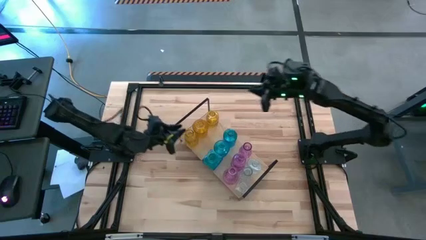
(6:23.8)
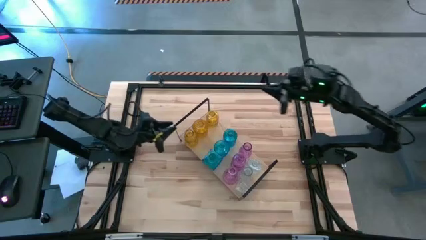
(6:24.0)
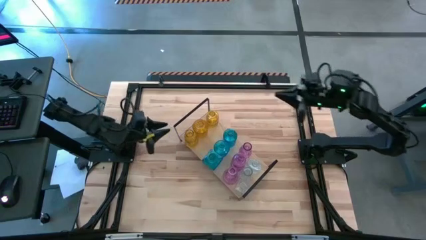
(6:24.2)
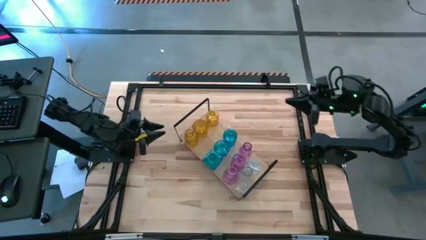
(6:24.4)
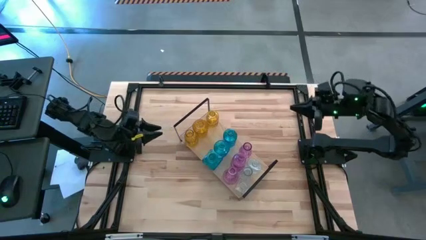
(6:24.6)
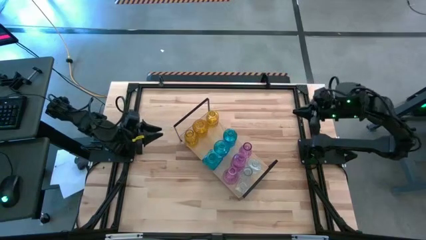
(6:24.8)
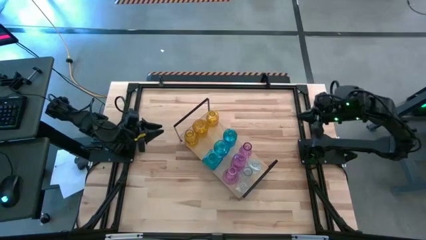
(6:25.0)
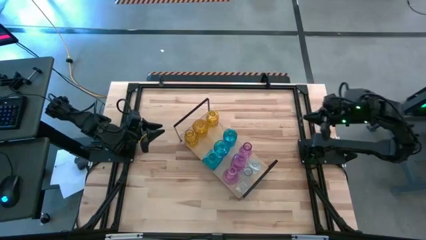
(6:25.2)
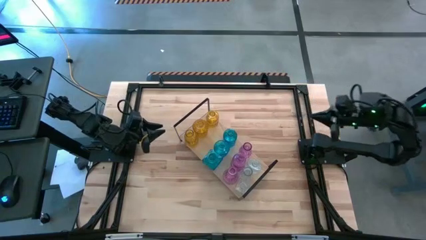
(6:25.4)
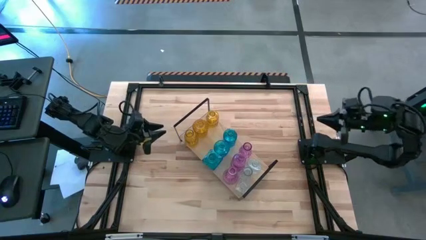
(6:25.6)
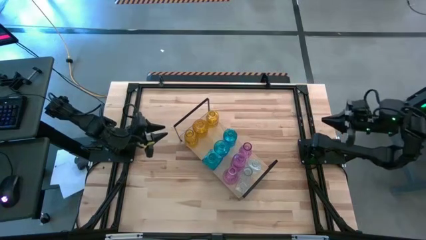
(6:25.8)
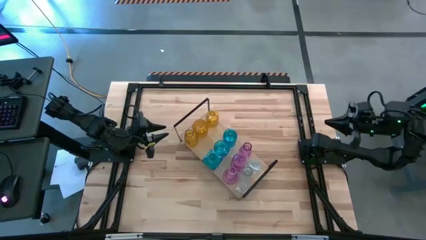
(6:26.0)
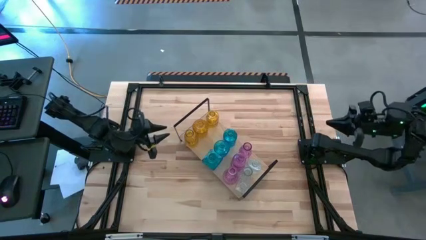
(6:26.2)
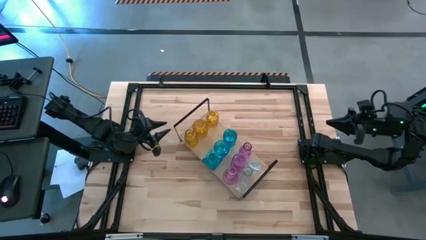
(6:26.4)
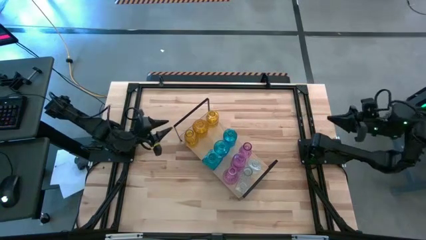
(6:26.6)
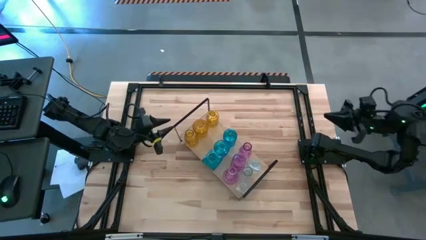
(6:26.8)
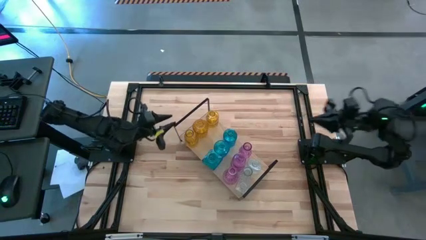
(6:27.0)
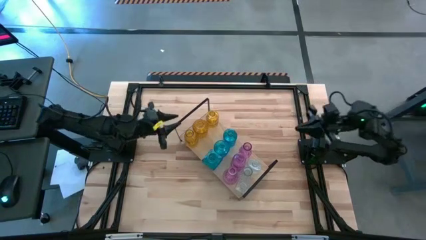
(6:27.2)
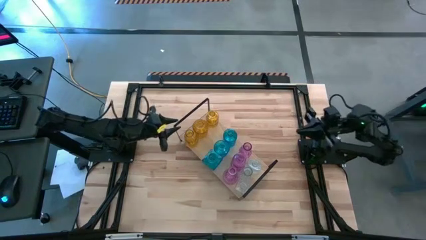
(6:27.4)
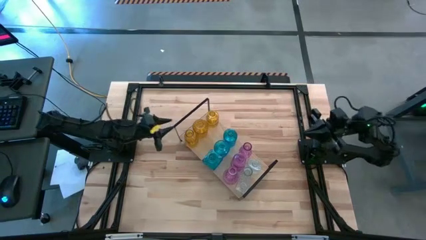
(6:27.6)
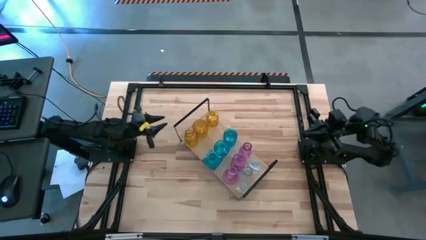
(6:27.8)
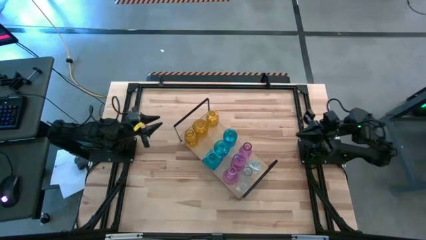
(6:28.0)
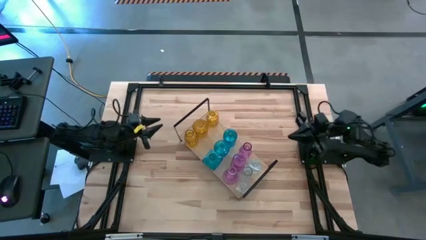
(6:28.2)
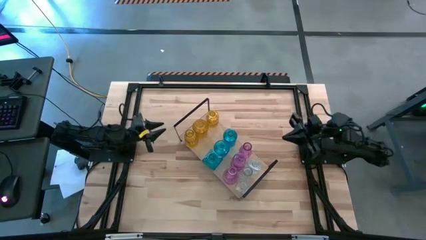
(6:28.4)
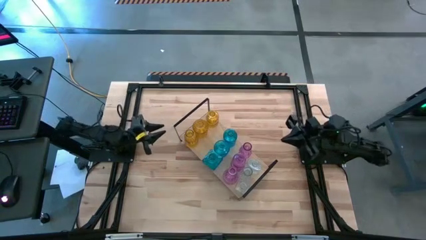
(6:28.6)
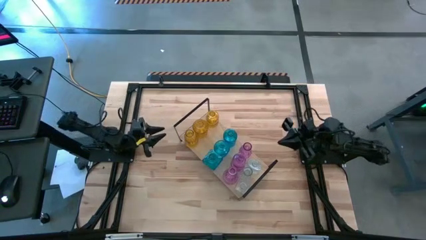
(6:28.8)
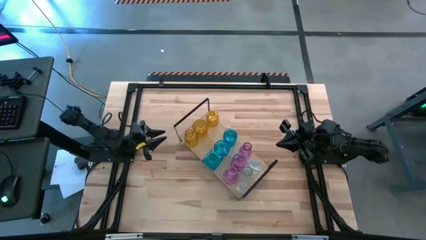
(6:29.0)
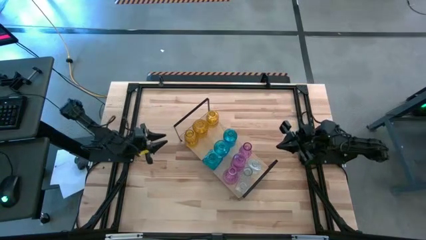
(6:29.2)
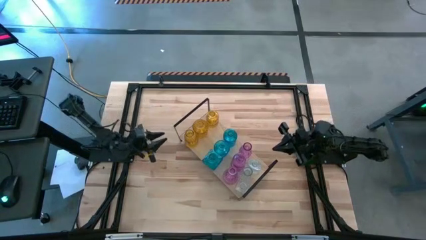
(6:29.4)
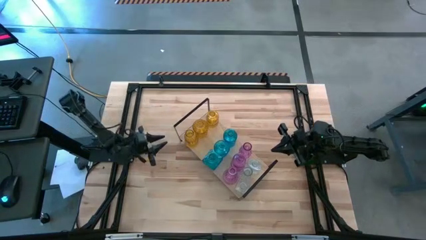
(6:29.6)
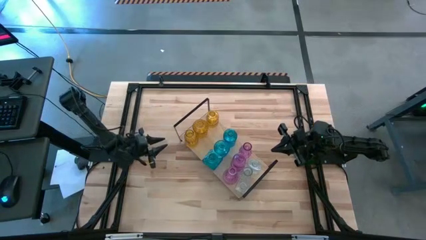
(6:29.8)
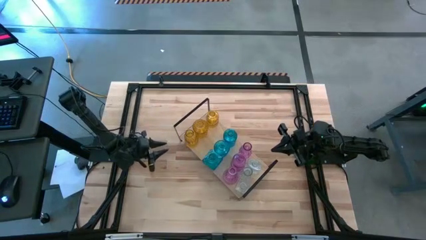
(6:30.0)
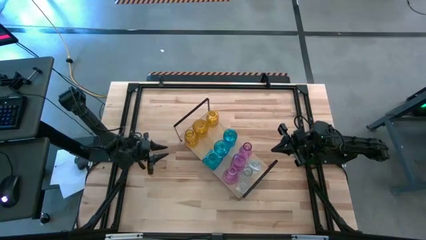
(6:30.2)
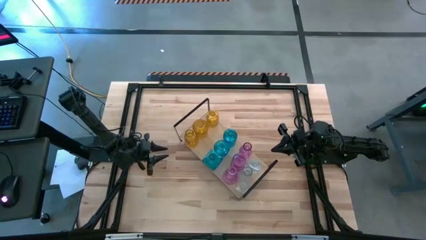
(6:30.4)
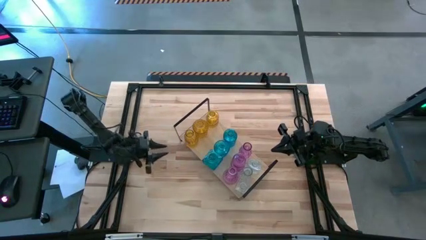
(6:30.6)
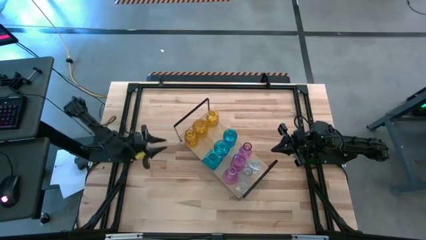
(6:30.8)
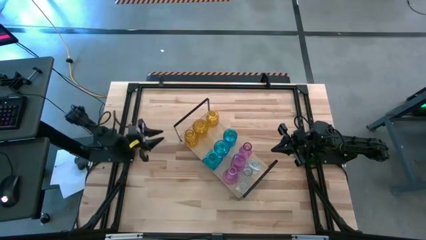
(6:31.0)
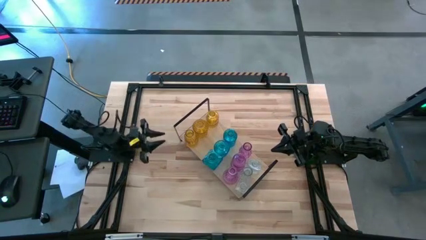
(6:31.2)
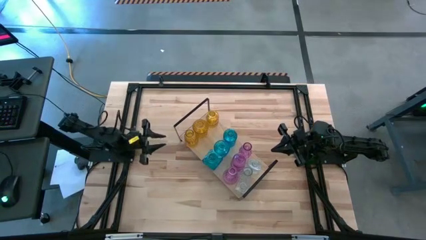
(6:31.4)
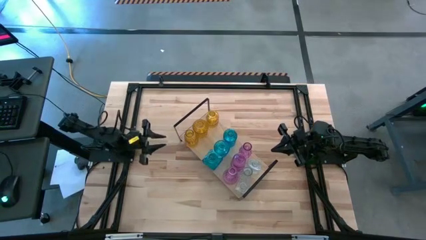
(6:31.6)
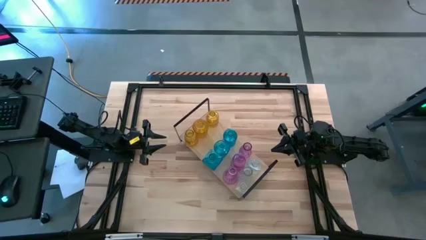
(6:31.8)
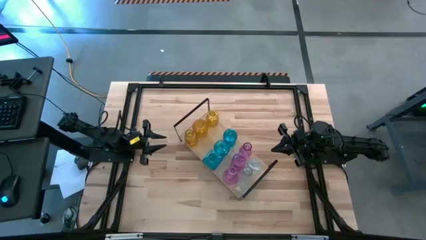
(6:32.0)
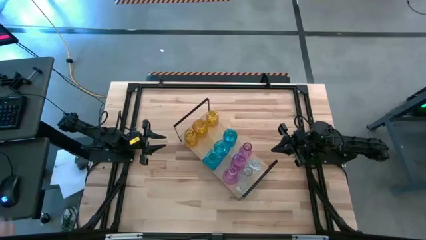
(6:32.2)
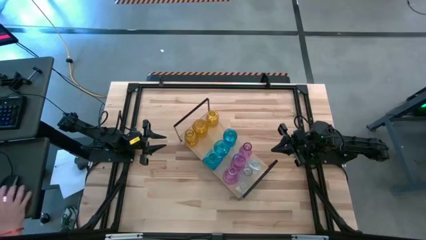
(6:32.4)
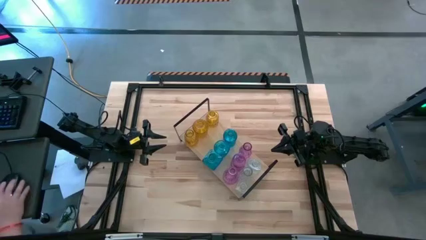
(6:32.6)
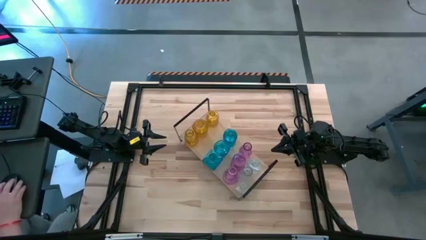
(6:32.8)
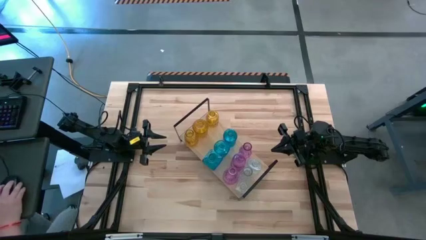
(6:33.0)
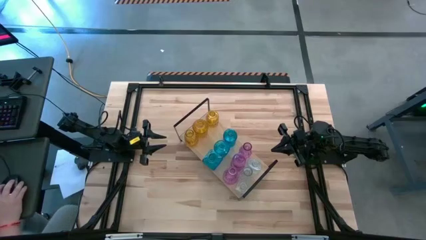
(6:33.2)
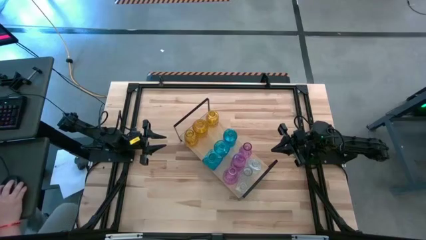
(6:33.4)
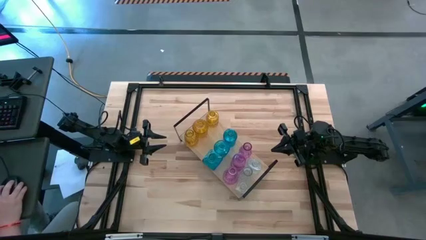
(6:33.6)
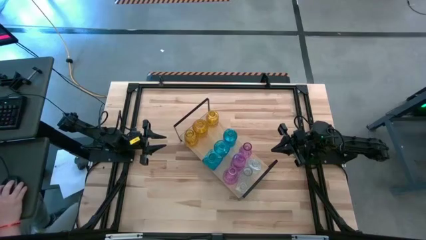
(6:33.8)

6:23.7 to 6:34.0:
Task: sort vases onto shelf
Return to Home Position
